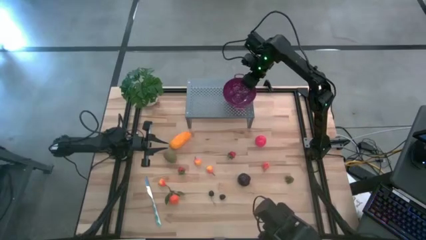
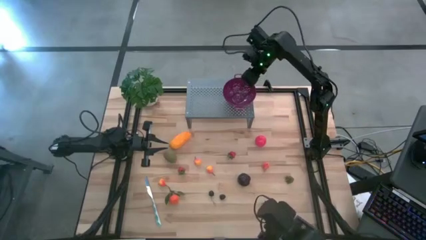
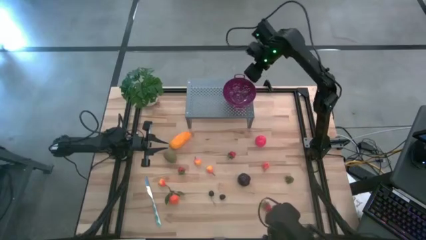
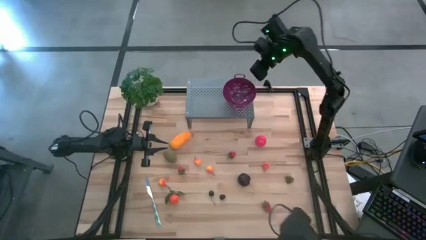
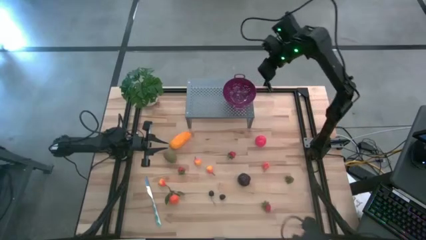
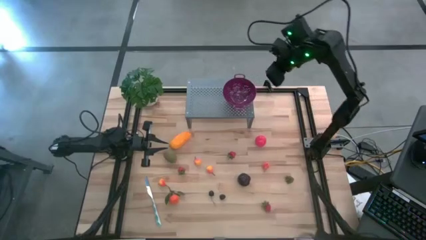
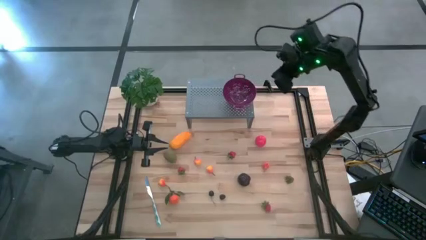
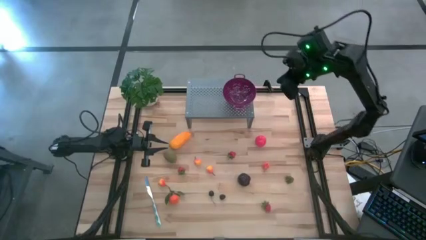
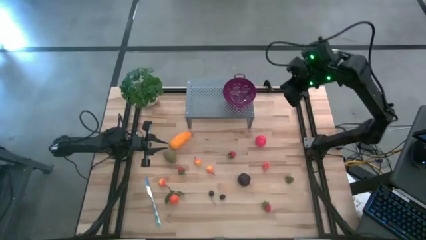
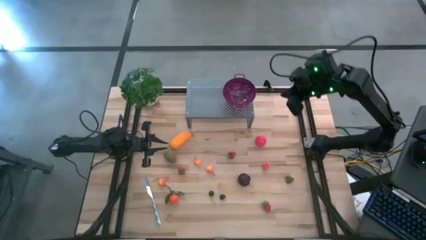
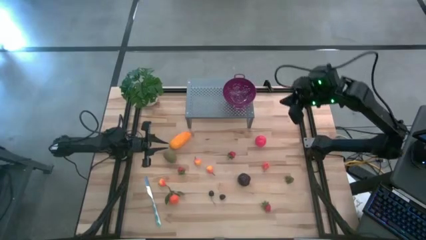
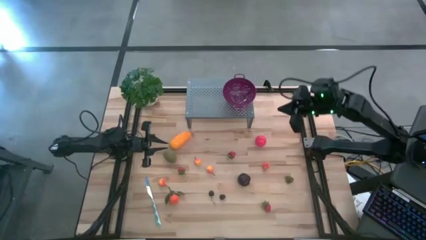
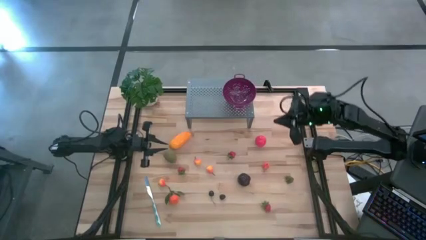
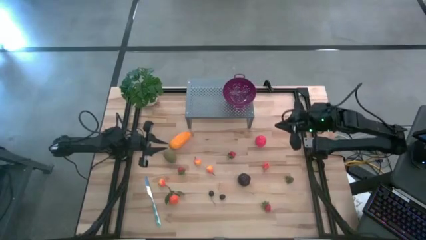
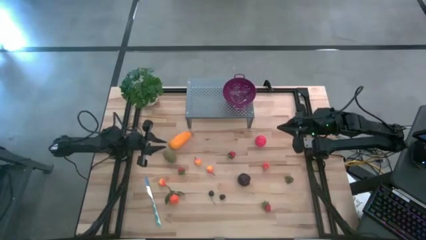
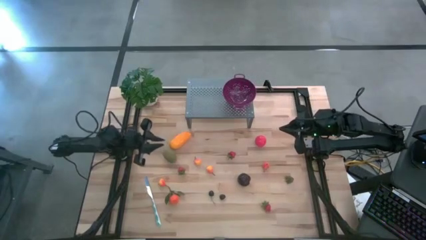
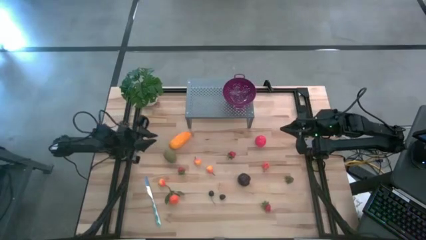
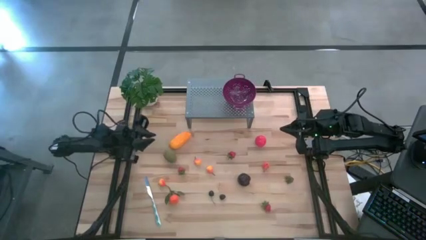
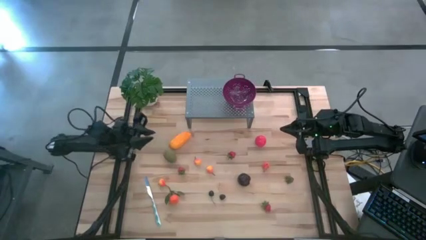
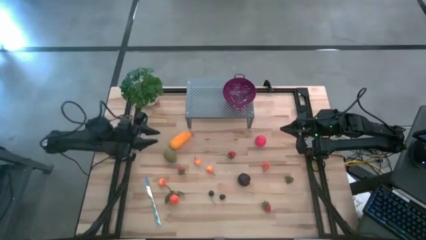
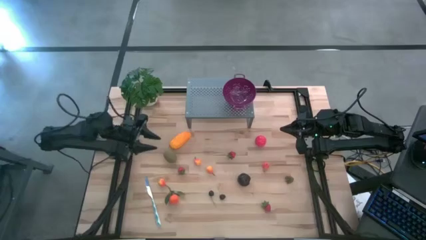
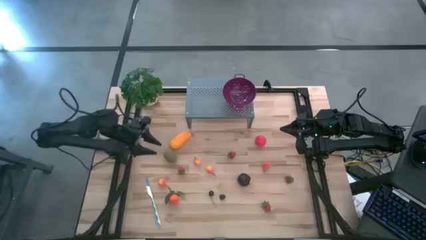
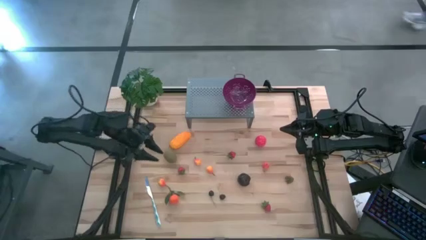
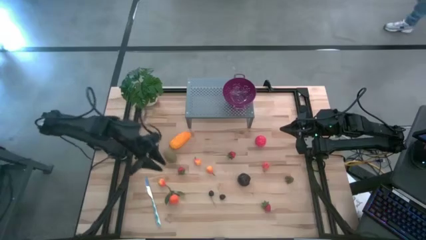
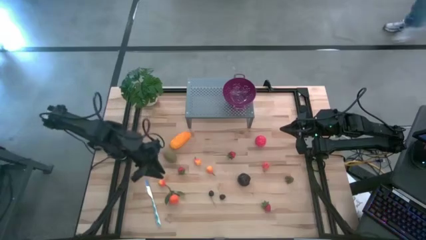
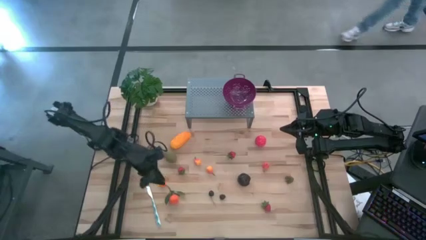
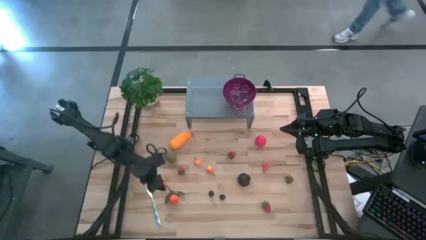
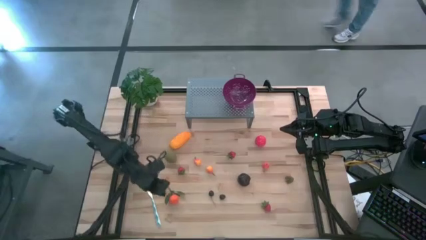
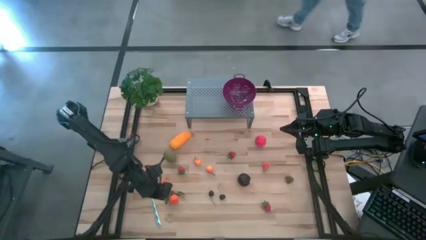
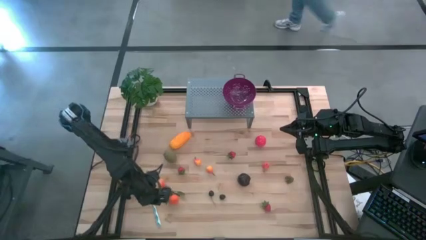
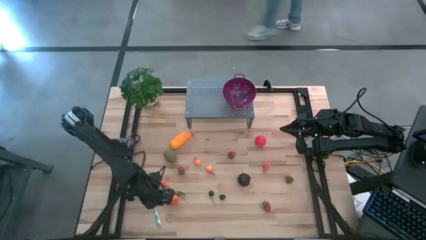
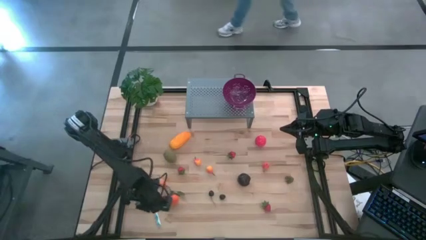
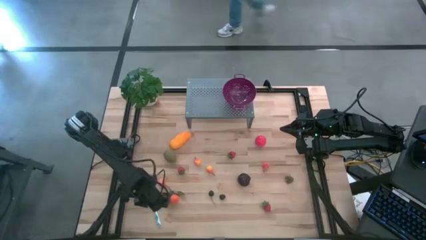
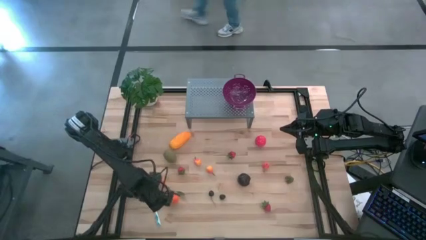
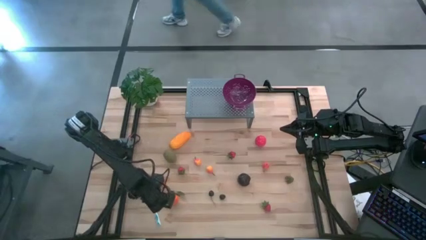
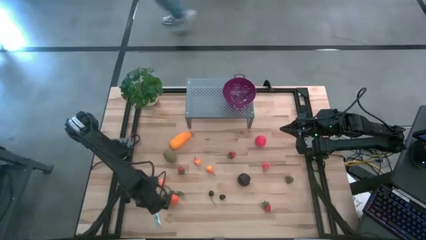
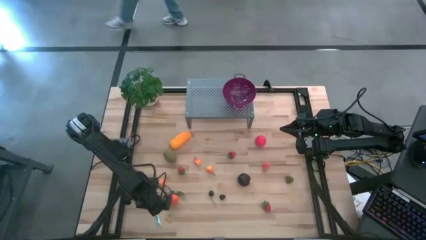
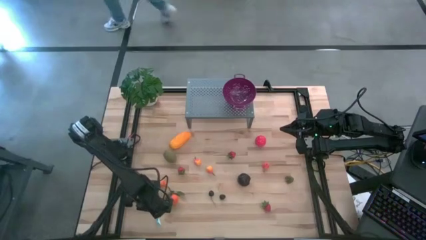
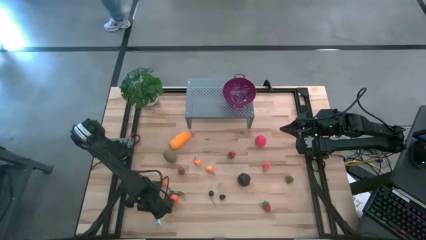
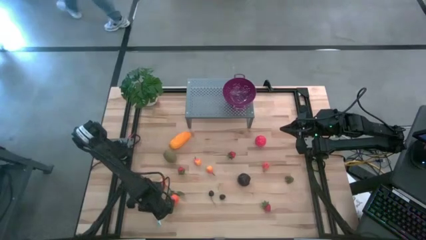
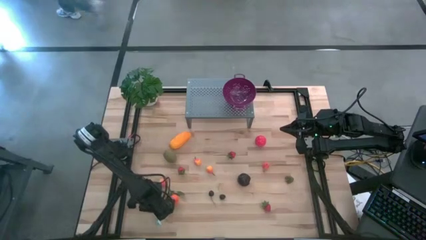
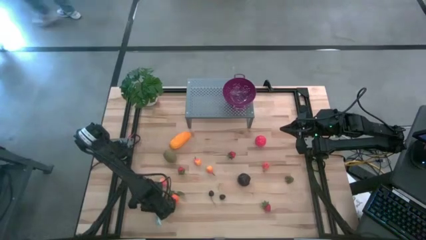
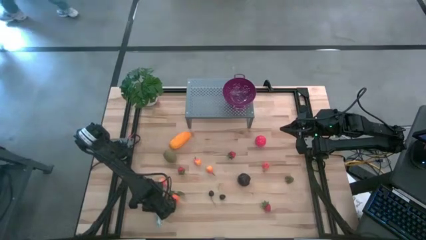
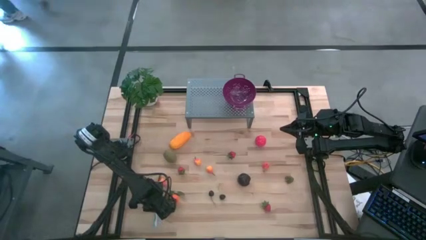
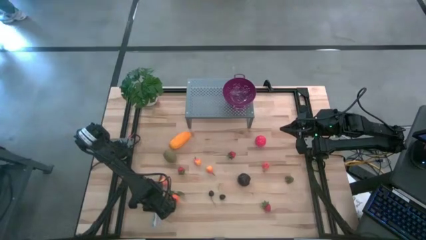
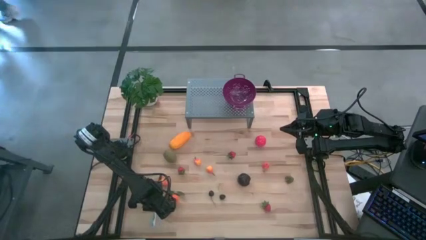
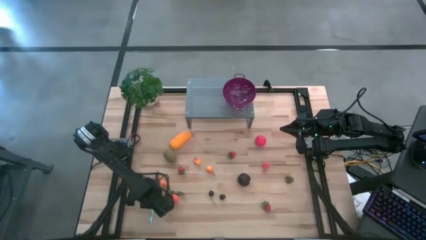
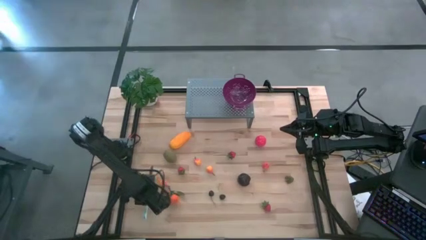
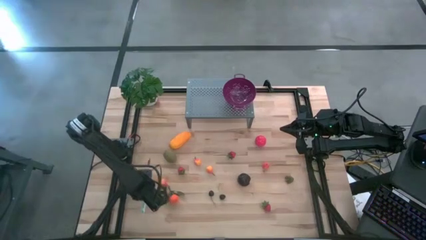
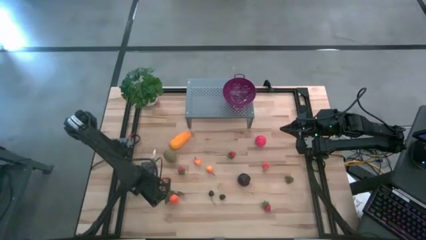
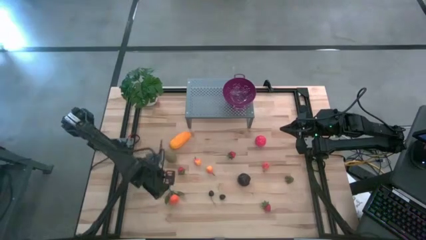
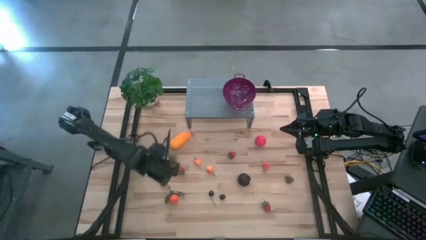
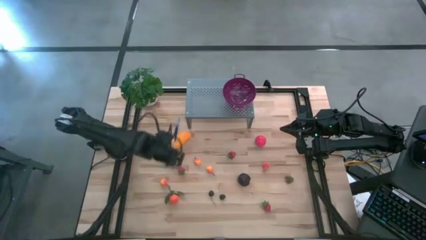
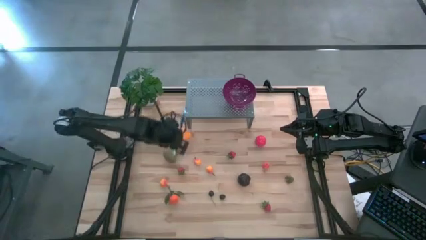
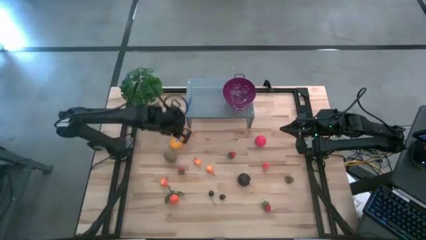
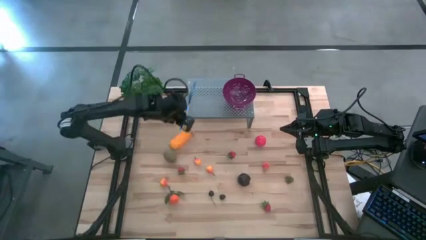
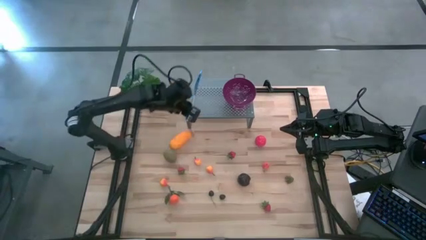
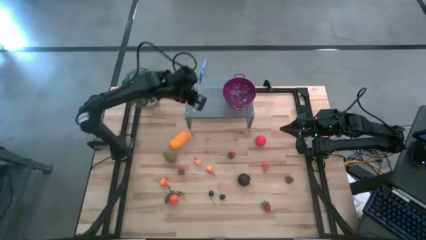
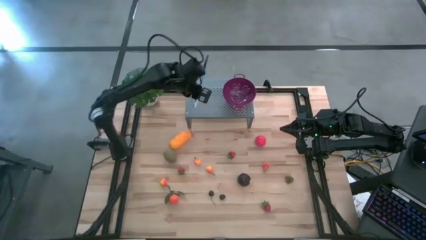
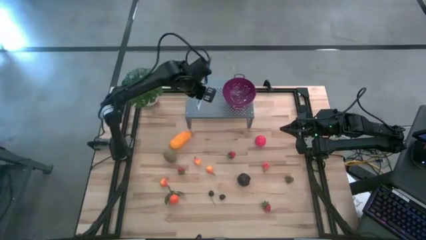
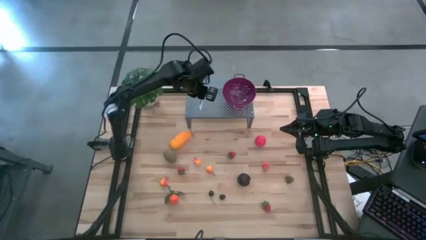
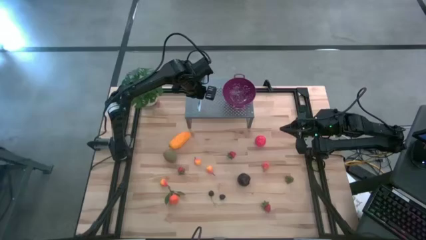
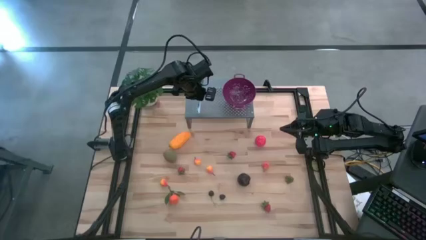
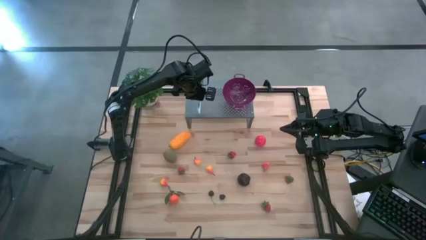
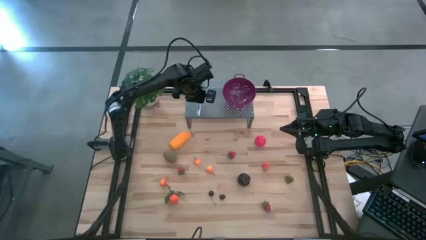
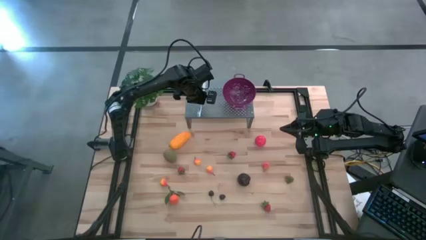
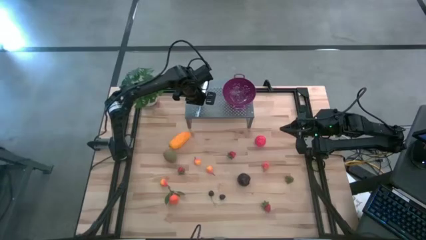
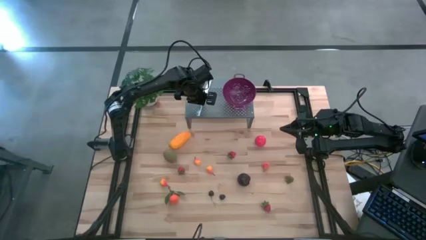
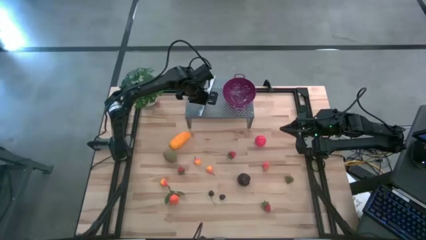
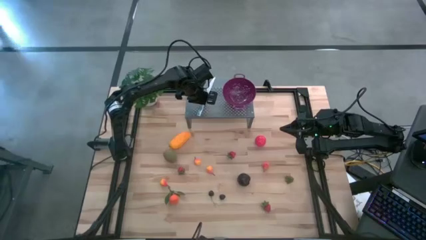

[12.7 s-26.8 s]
Task: Pick & Place Fruit
Put the blue knife on the shelf
